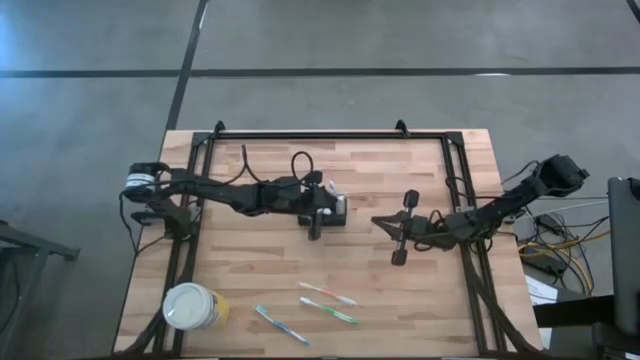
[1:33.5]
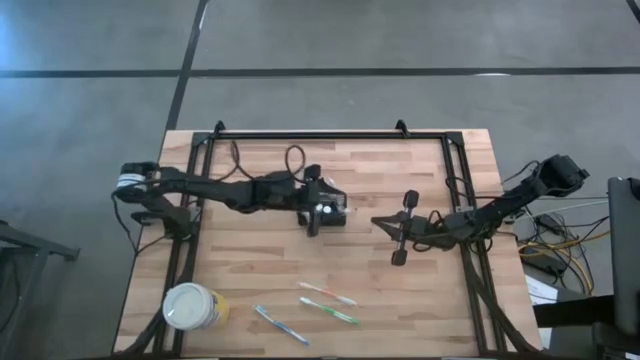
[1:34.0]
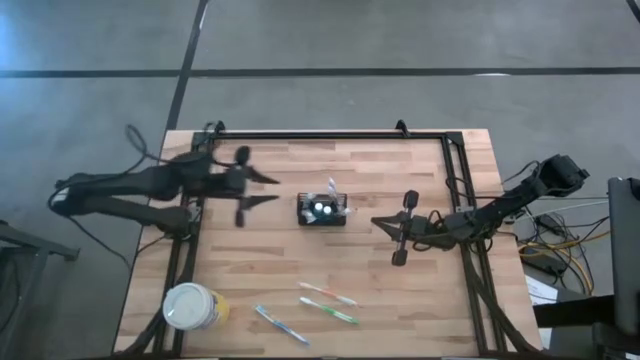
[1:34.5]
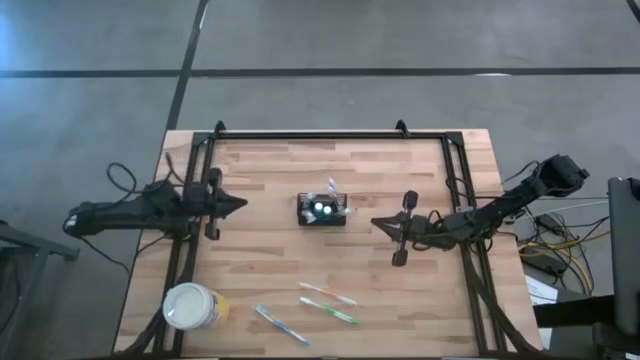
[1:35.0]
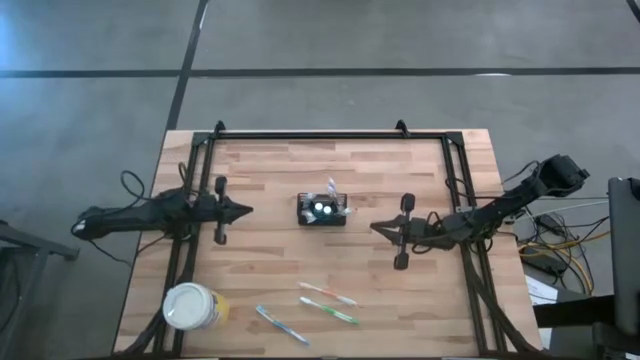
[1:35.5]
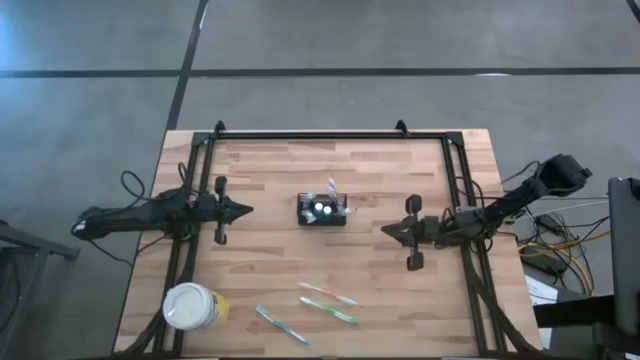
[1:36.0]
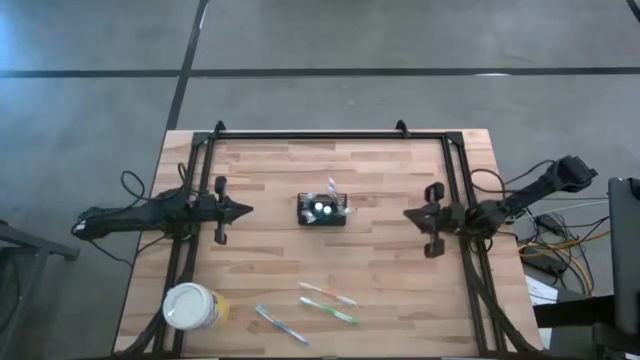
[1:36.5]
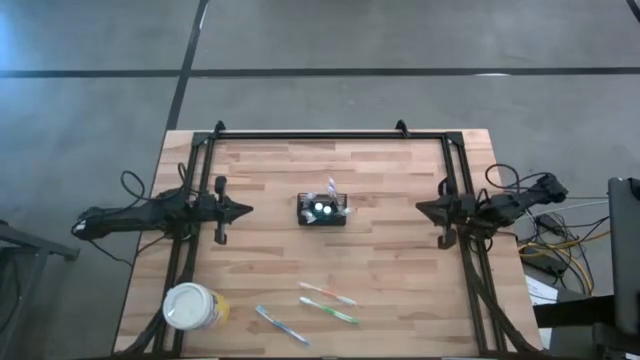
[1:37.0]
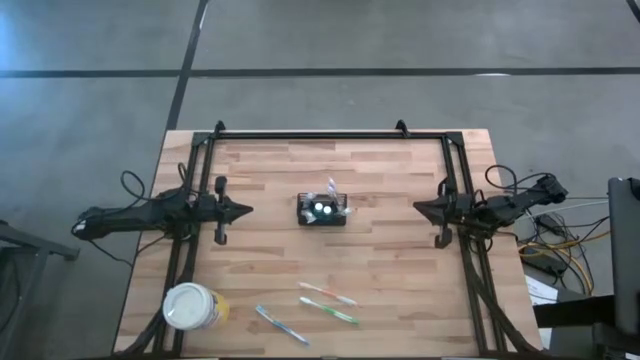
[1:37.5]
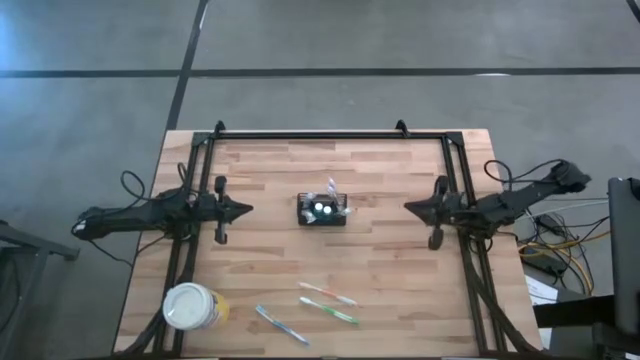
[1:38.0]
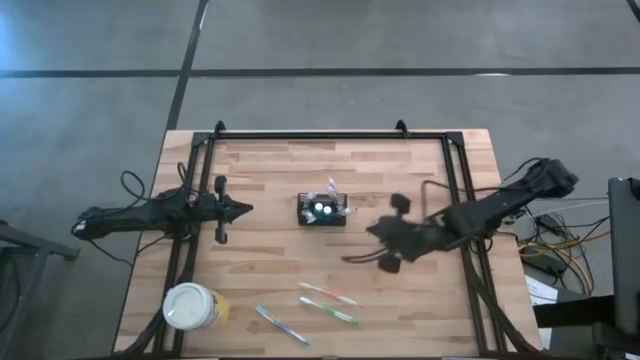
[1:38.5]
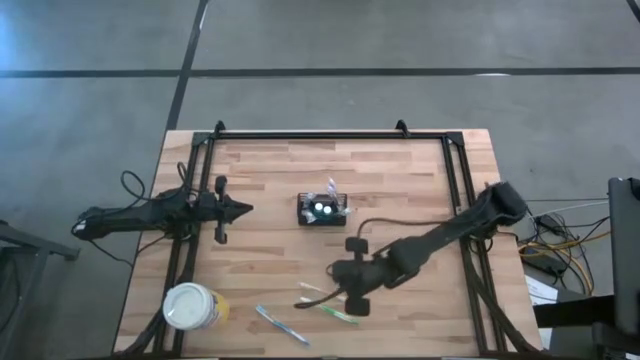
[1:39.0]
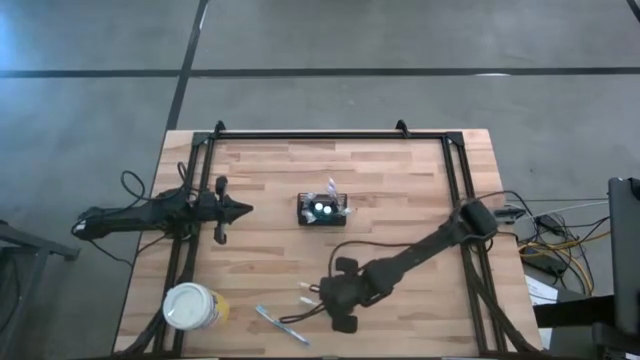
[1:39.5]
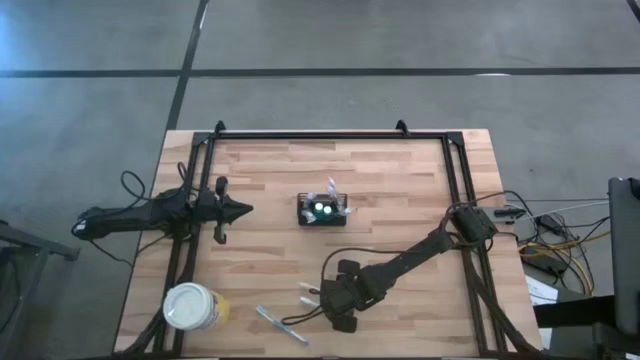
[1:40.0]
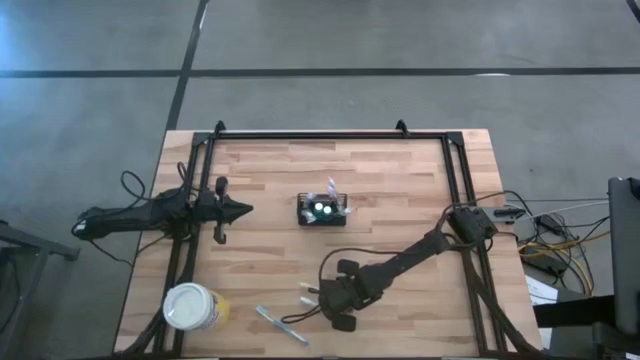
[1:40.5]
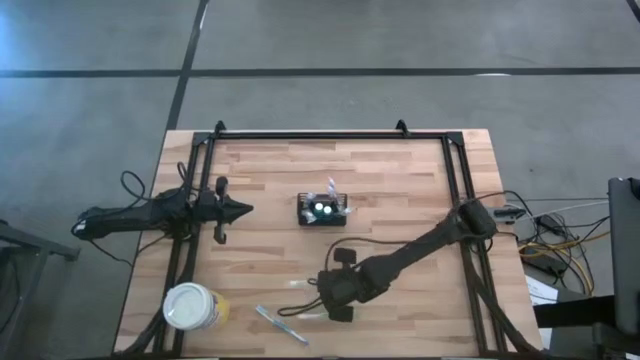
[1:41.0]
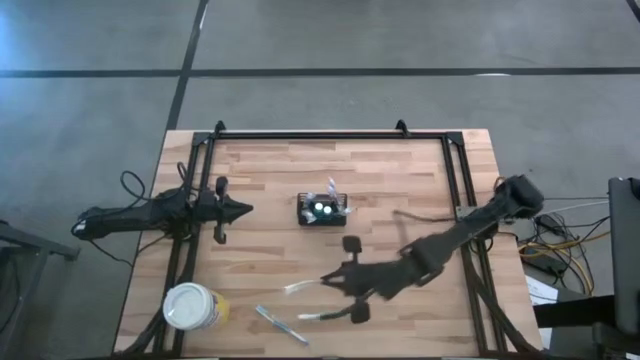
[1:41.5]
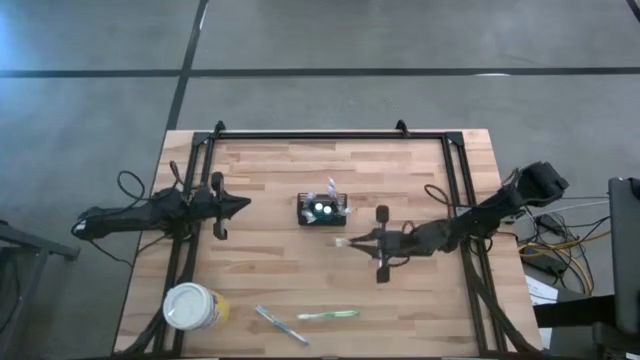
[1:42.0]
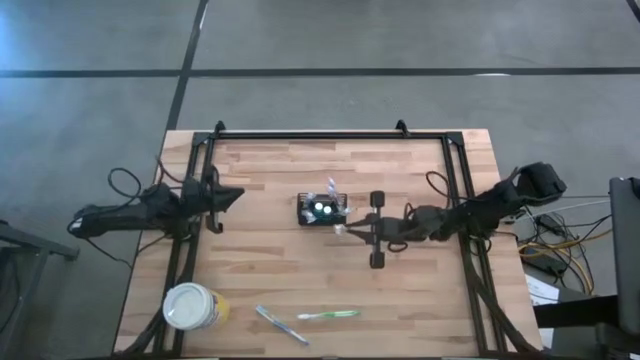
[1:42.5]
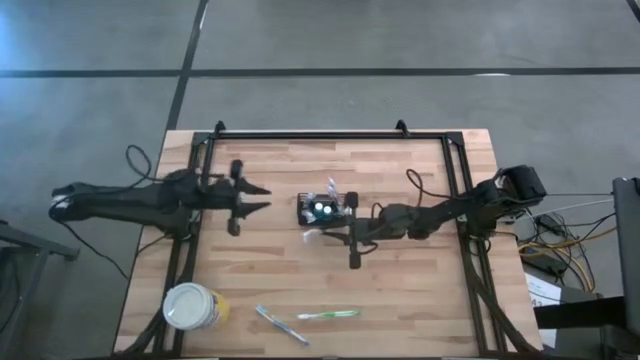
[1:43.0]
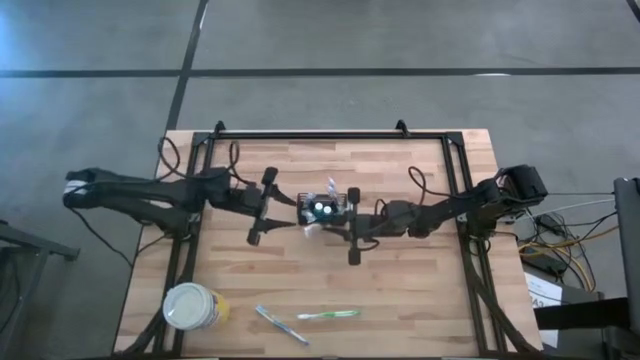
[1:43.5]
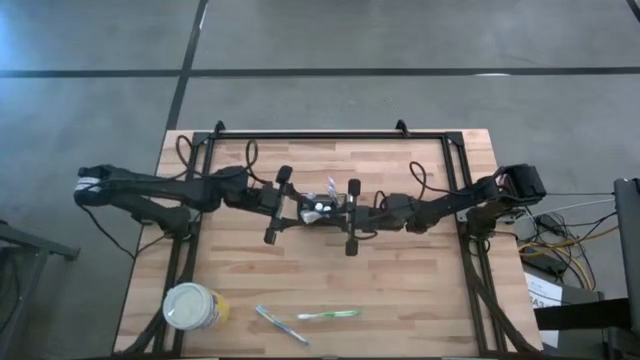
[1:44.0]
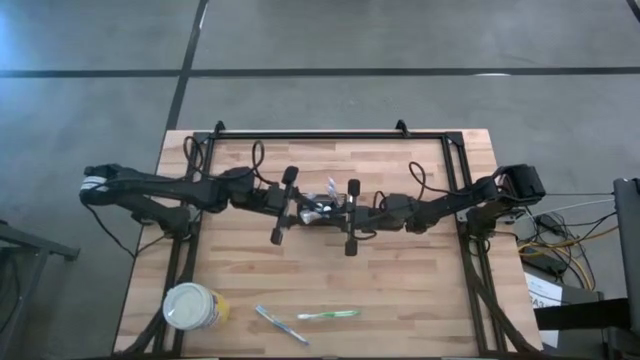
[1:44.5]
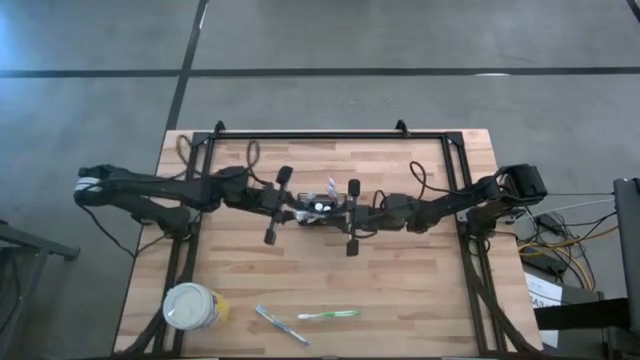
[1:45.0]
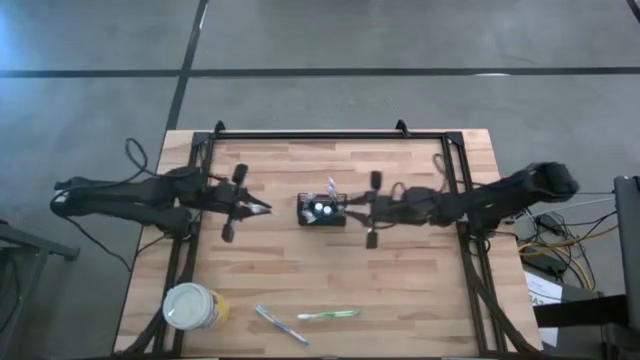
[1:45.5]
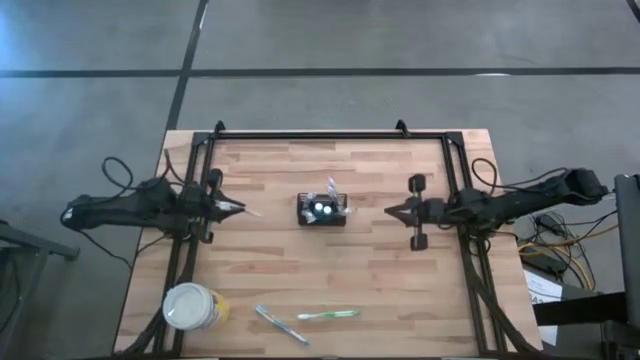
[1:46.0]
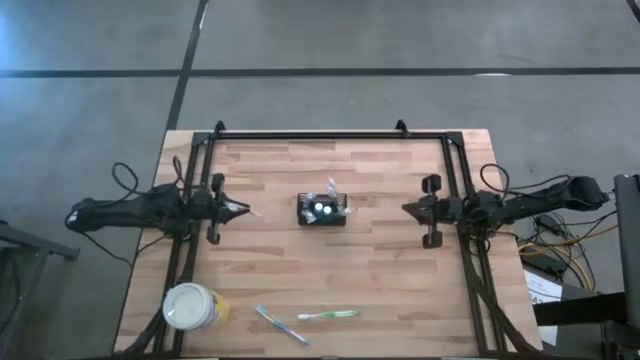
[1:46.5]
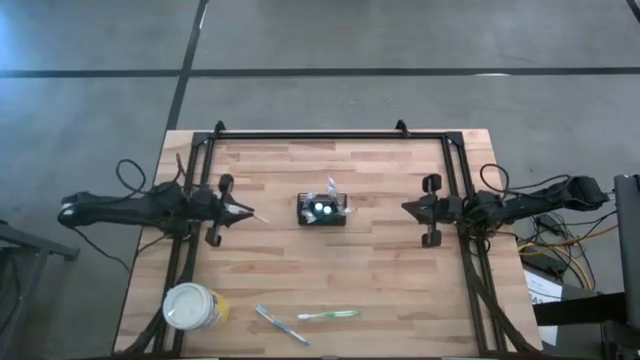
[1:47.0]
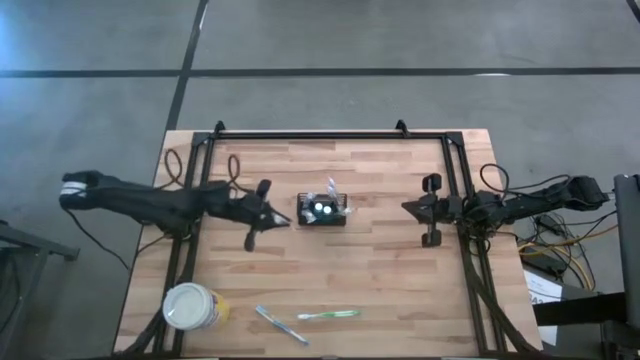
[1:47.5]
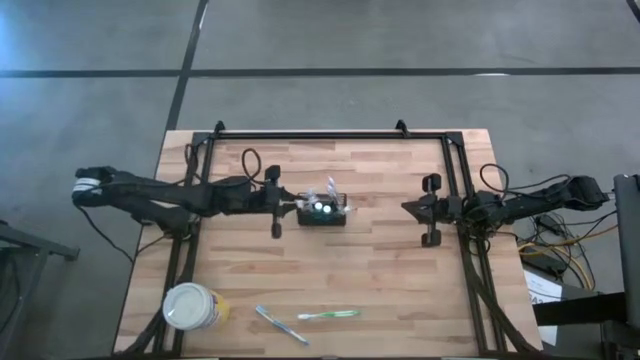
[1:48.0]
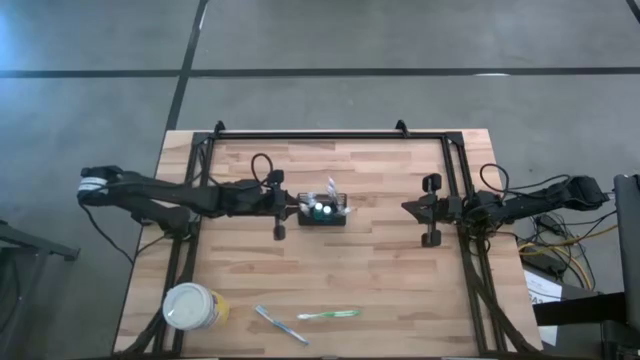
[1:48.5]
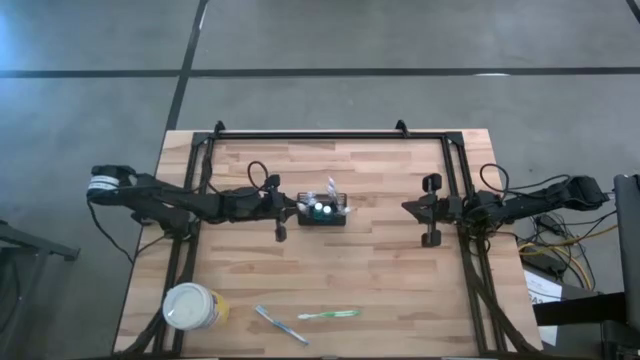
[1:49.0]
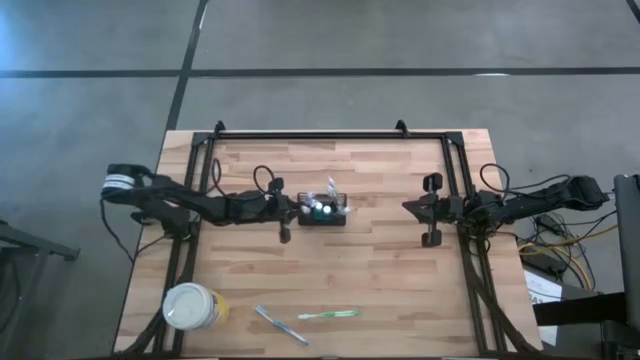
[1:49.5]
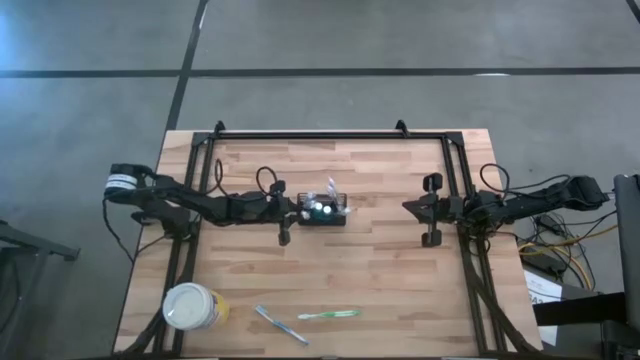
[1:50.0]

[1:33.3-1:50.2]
Task: Pick & Place toothbrushing station
Put the orange toothbrush into the black wire organizer

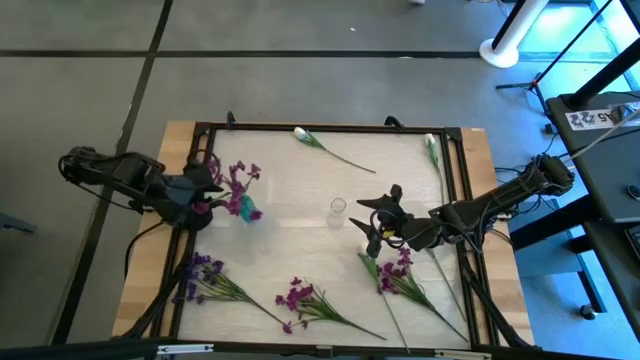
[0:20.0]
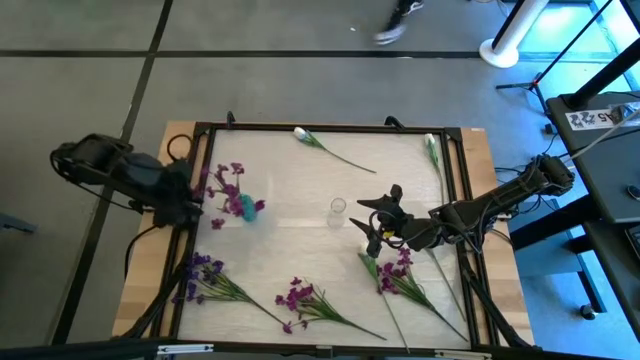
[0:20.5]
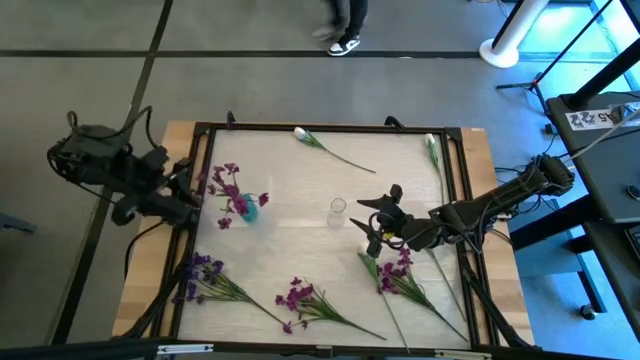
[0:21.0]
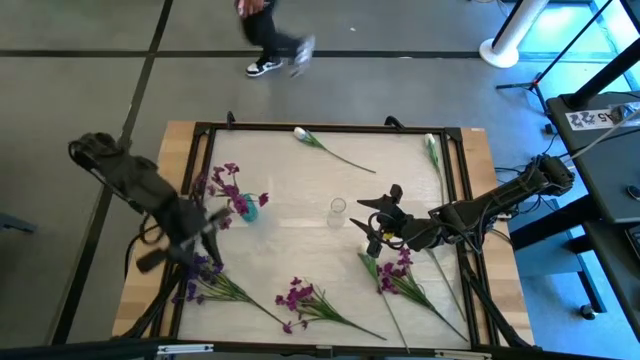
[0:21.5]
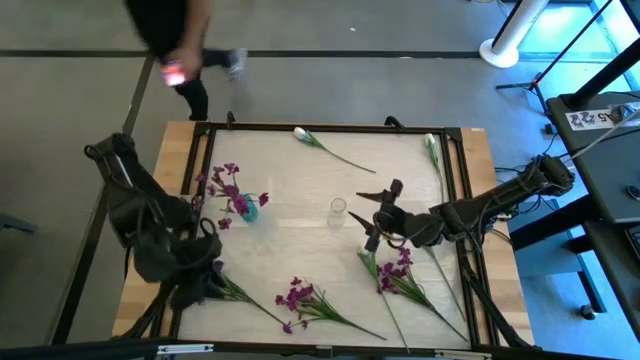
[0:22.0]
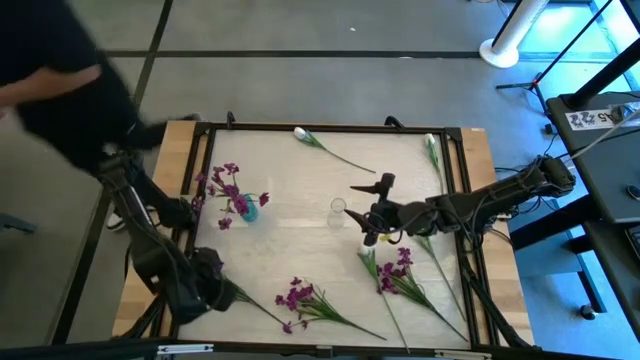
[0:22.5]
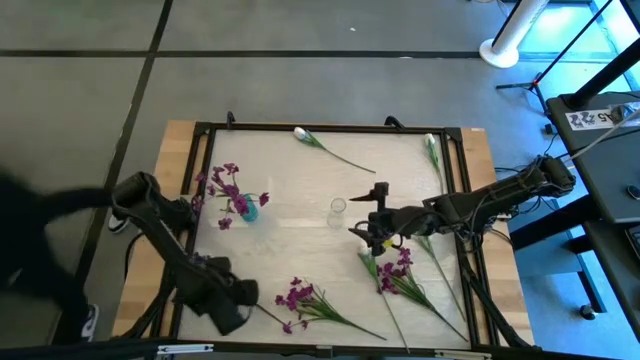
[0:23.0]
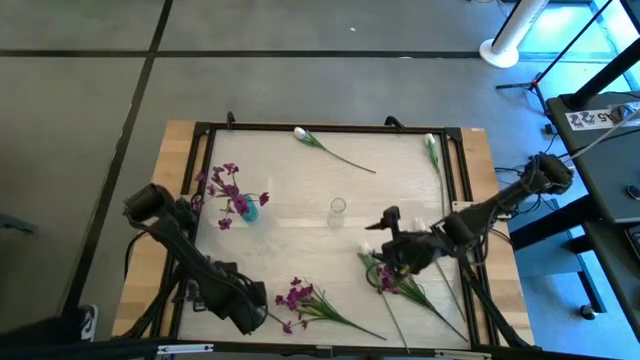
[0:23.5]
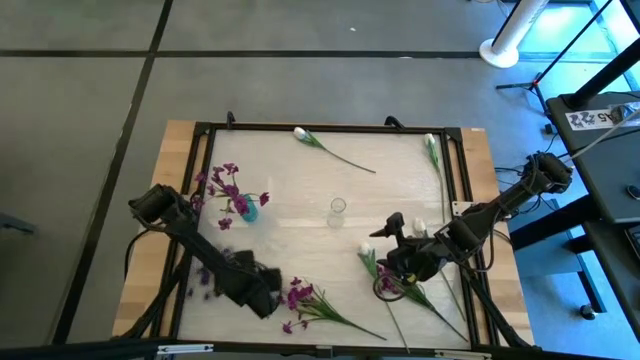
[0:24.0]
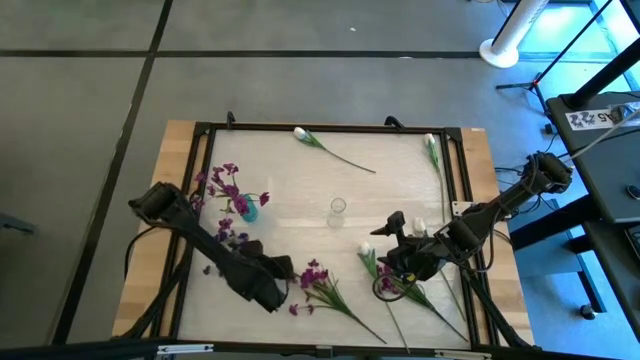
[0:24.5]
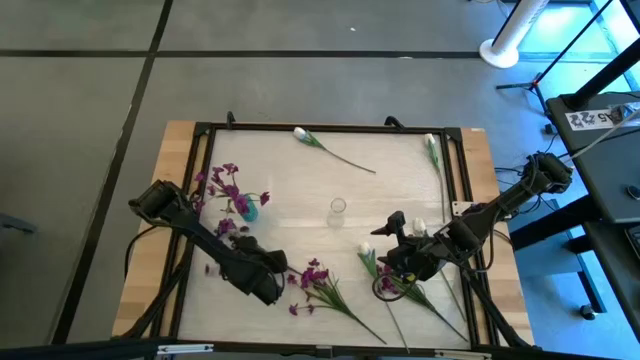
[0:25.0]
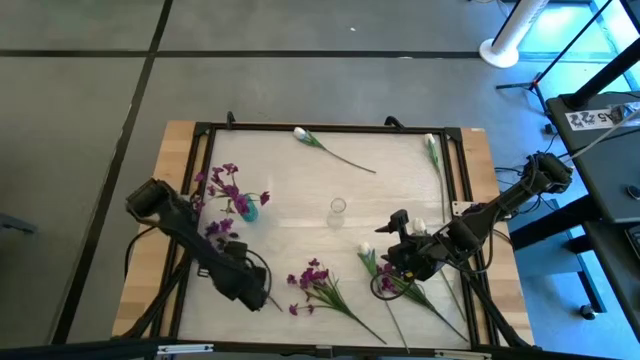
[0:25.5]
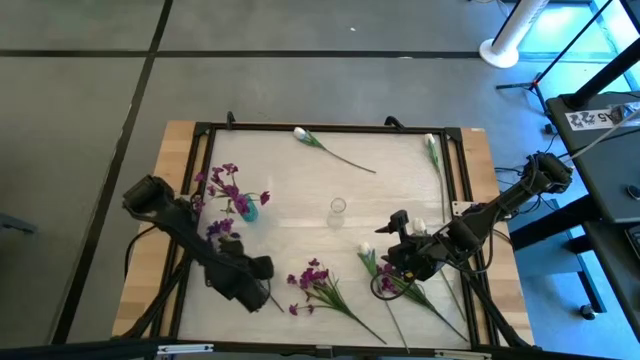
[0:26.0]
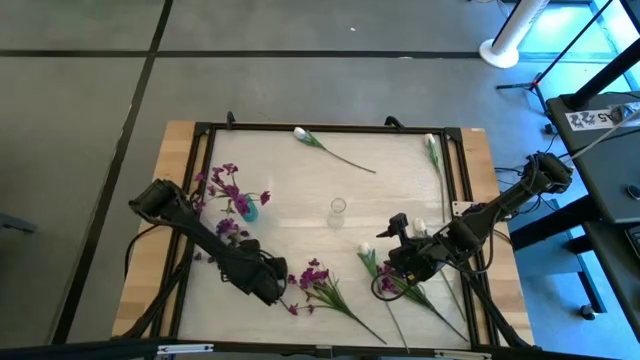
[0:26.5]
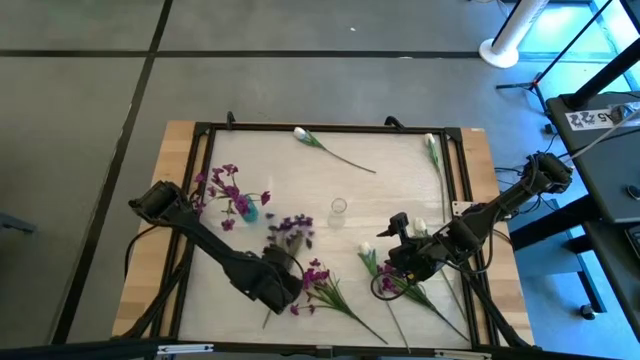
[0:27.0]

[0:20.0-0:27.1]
Task: Sort flowers into vase by color
Put the violet flowers into the blue flower vase
